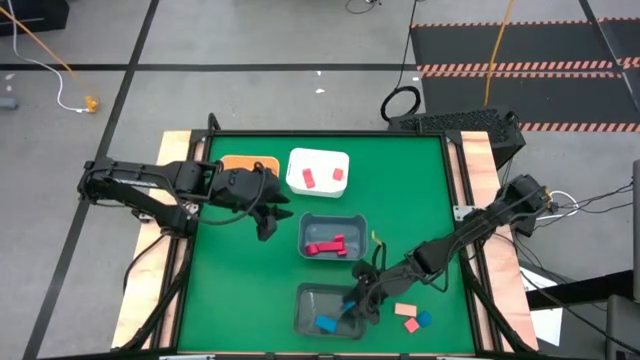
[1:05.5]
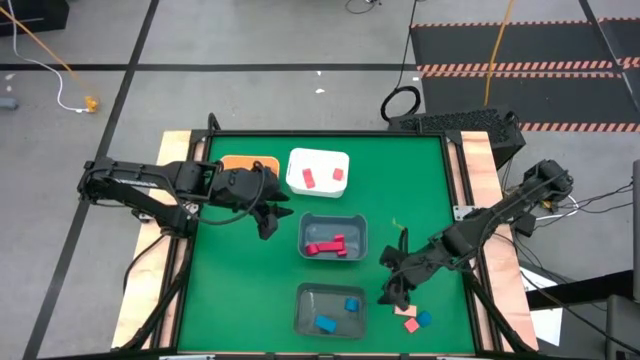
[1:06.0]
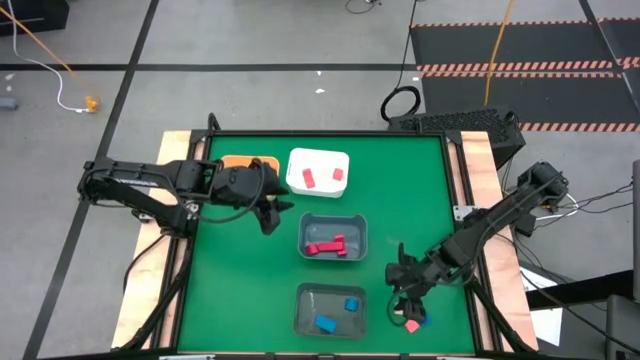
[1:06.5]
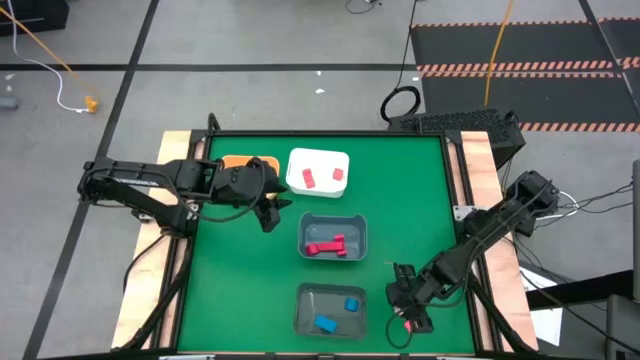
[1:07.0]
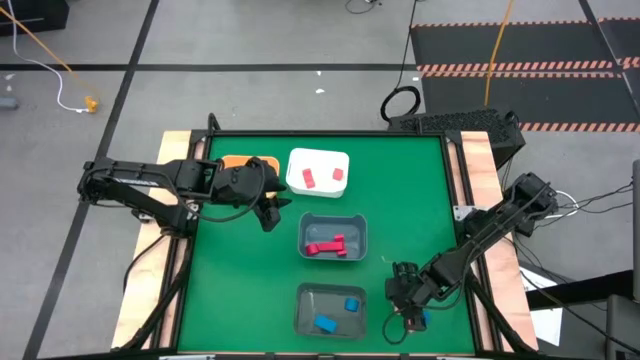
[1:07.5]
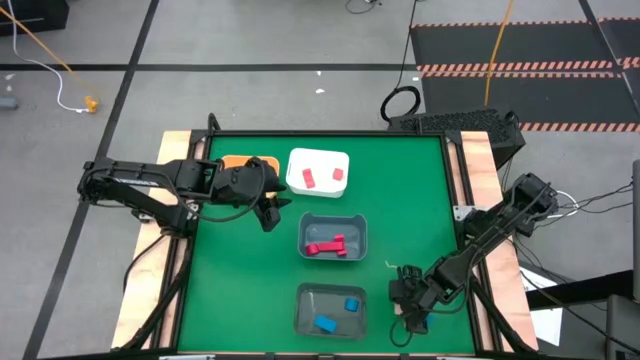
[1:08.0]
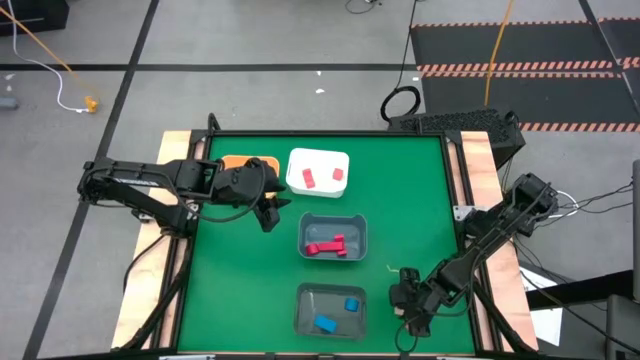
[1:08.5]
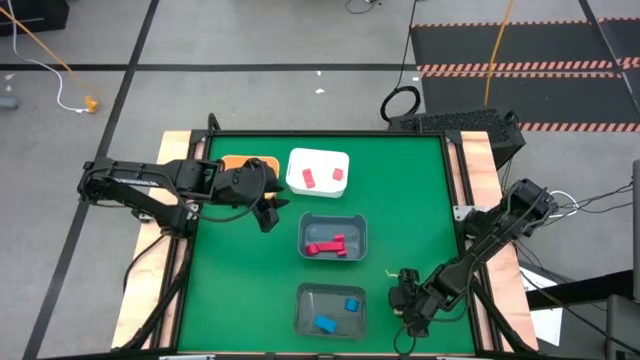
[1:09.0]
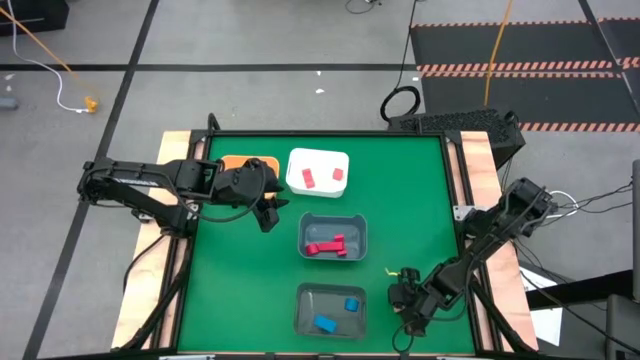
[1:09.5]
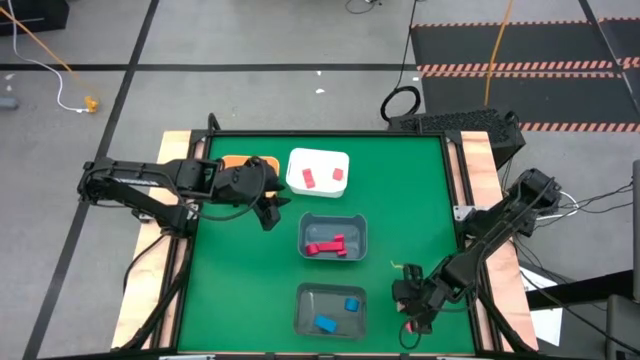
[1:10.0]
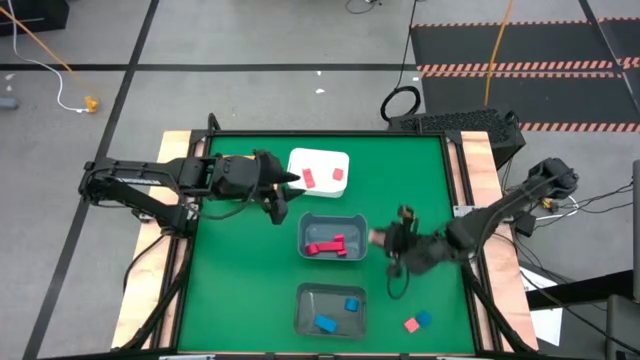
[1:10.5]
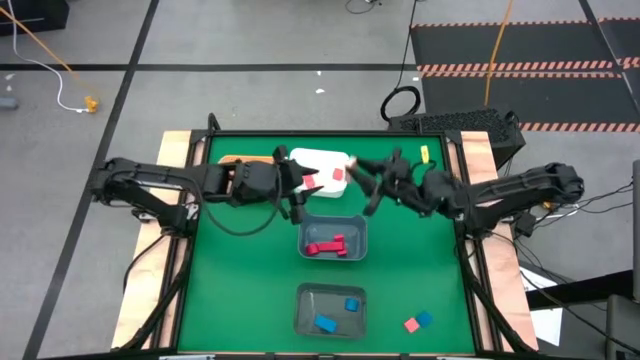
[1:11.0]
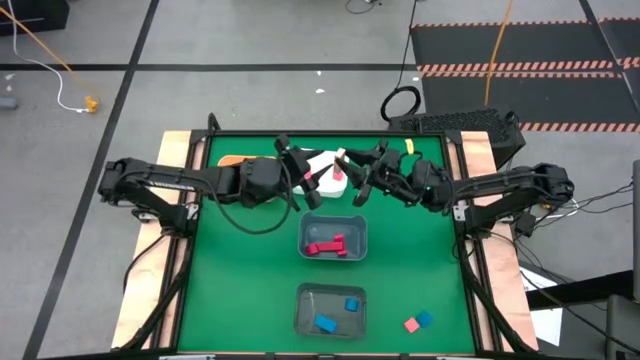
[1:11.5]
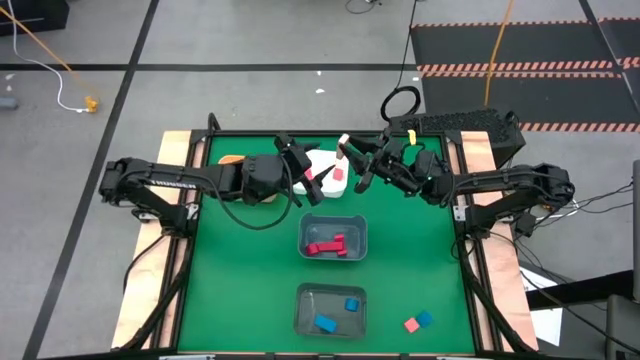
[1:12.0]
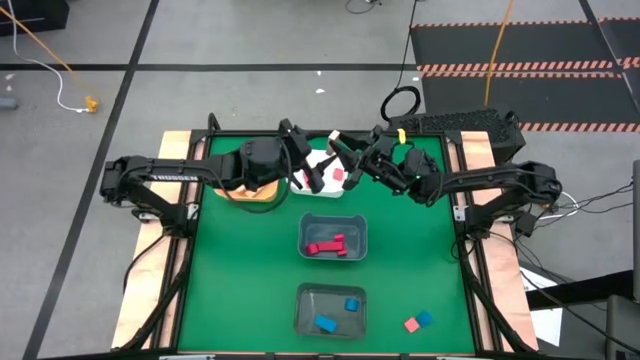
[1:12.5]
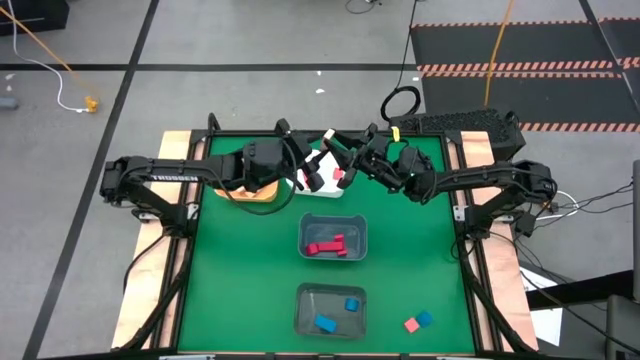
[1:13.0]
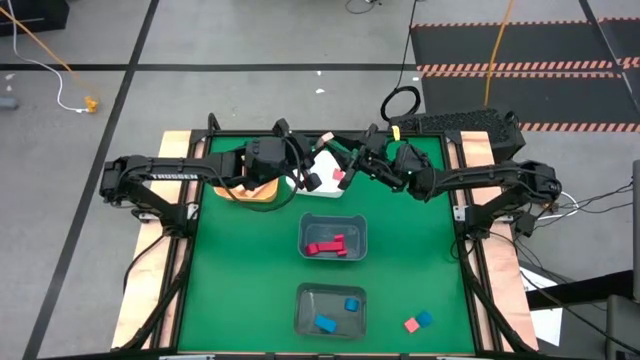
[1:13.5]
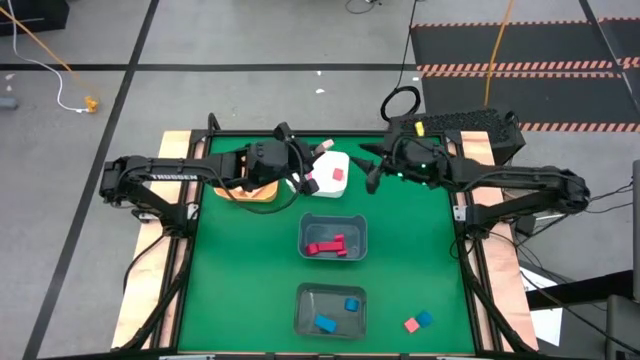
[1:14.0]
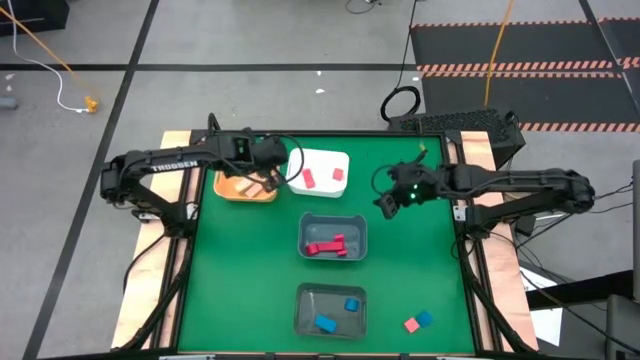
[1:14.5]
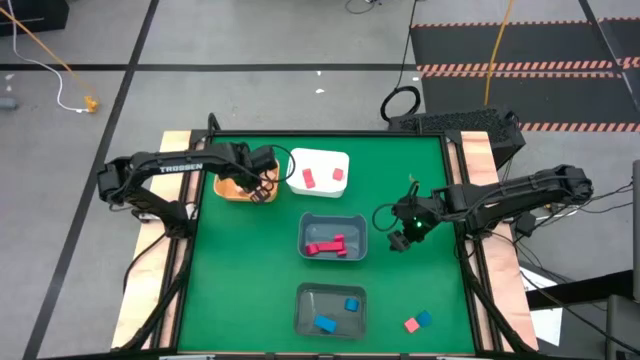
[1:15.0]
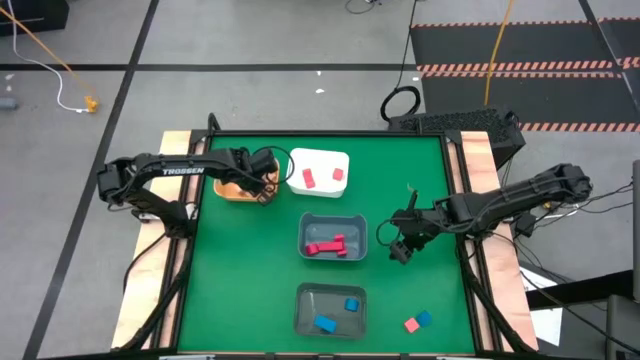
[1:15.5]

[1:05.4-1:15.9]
Task: Sort & place blocks by color
Put the brown wooden block into the yellow bin

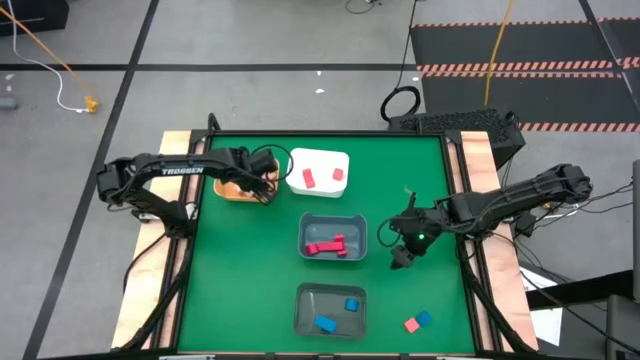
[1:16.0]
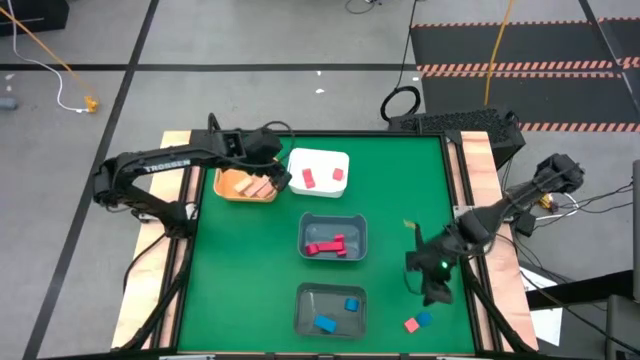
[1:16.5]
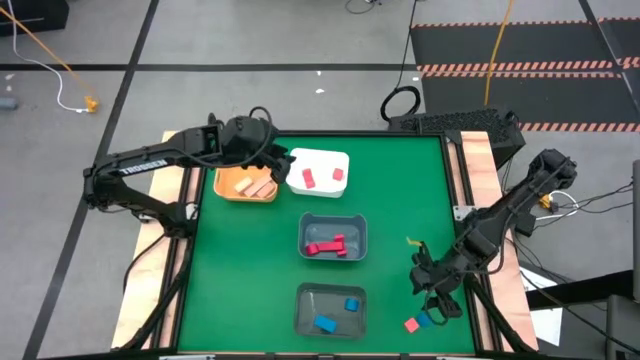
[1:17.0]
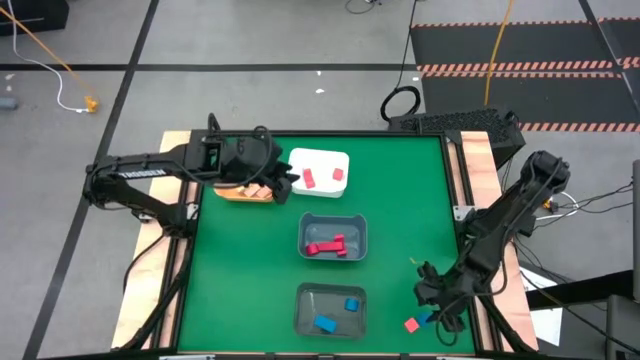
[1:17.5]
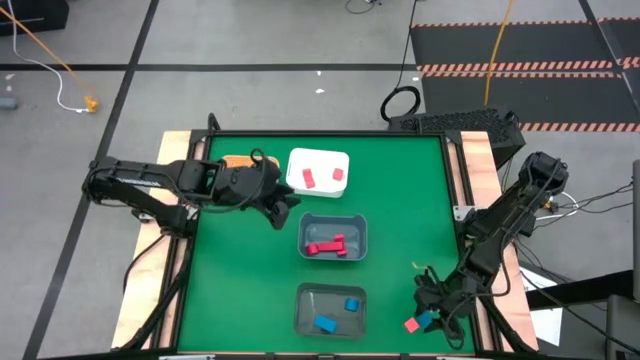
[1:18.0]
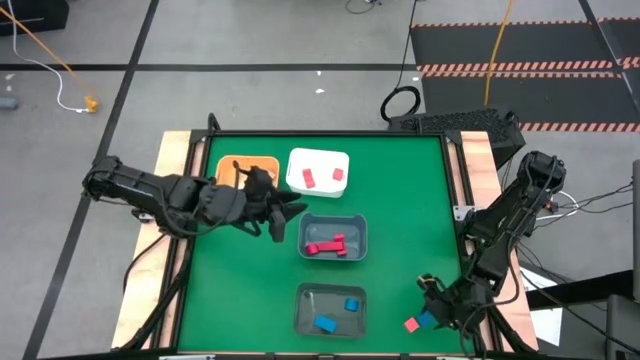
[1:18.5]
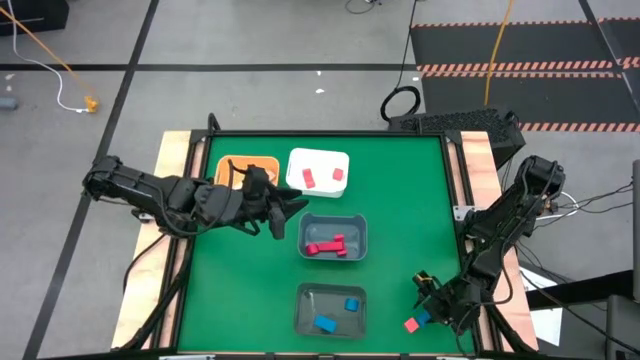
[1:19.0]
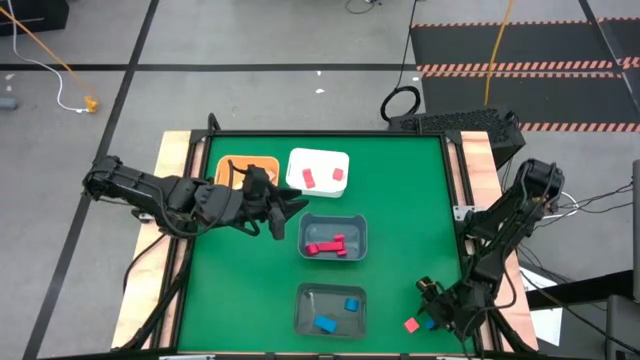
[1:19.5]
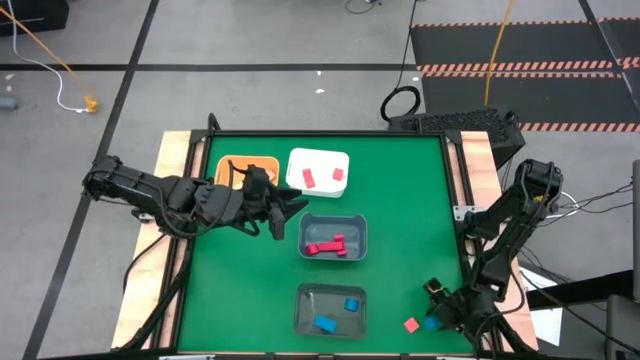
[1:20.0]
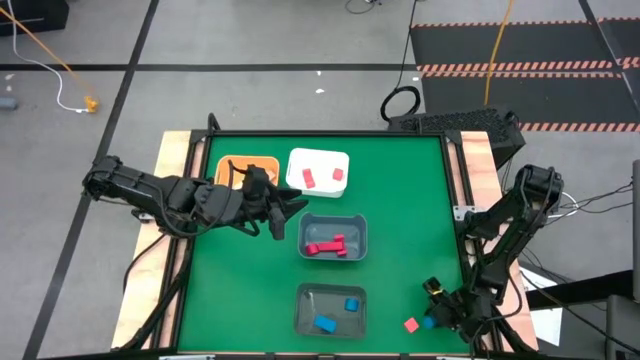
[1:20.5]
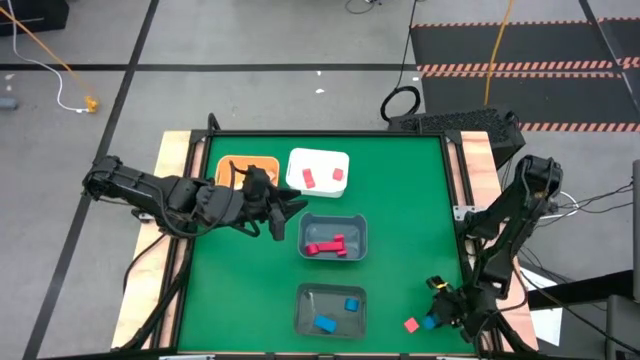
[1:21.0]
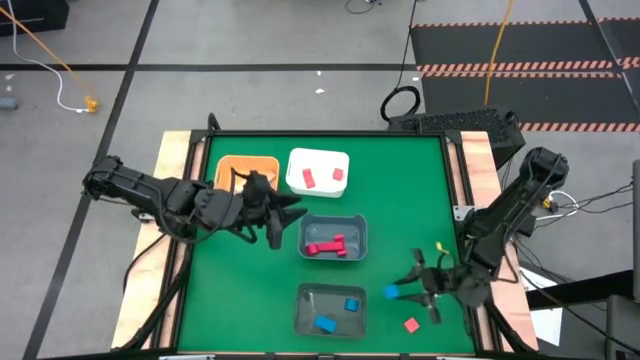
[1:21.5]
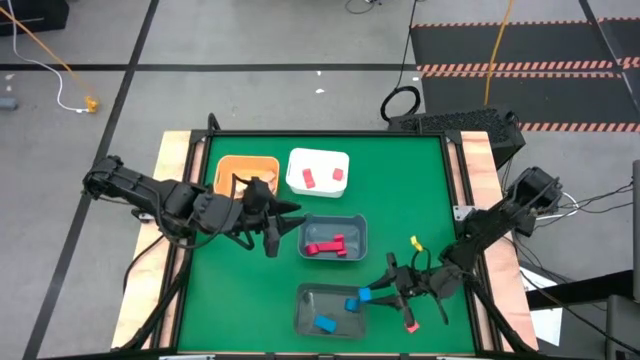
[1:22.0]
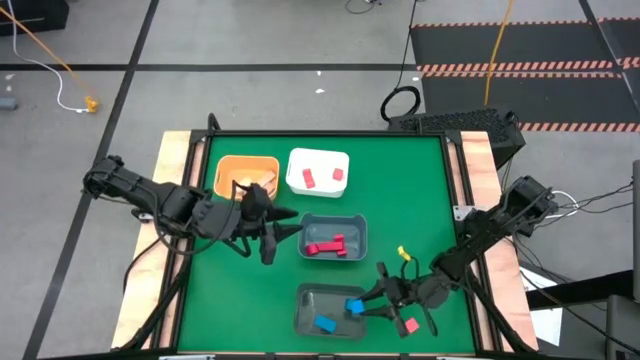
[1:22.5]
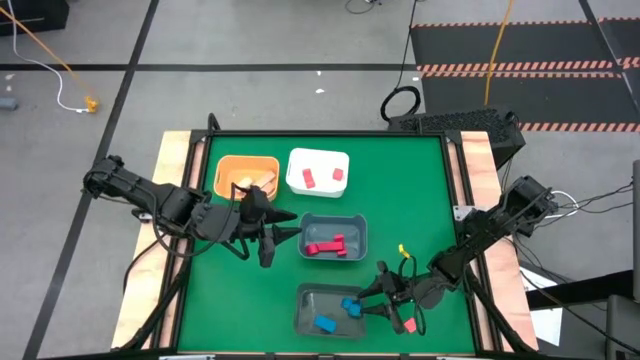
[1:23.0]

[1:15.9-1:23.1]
Put the blue wooden block into the black bin

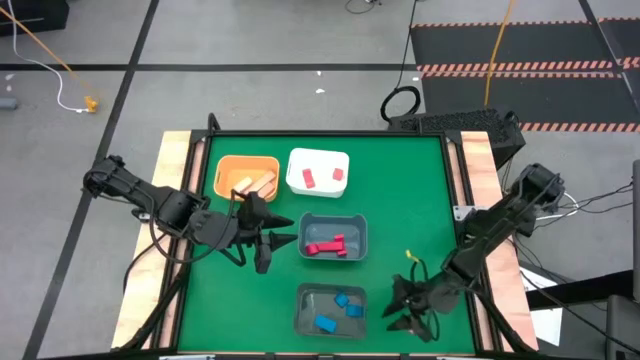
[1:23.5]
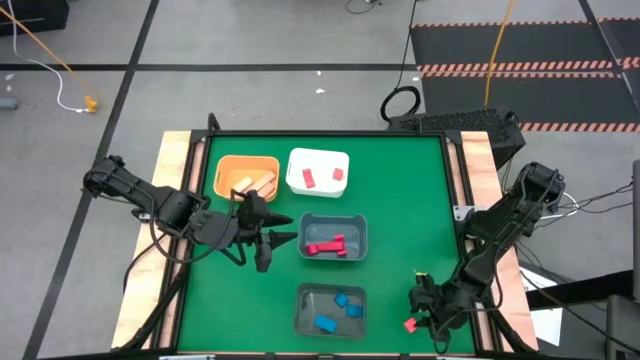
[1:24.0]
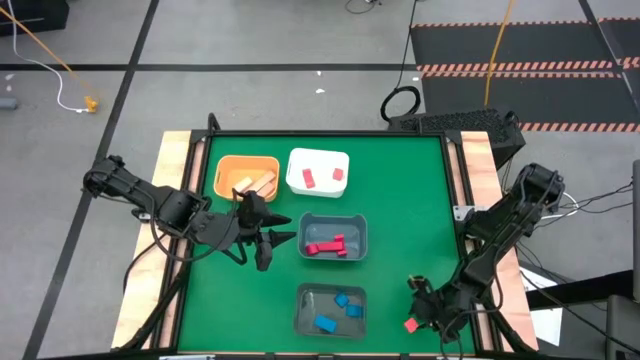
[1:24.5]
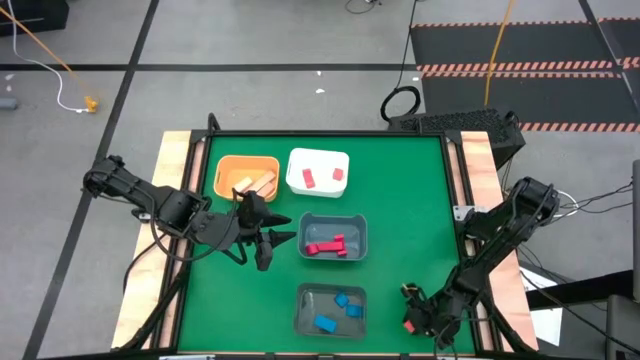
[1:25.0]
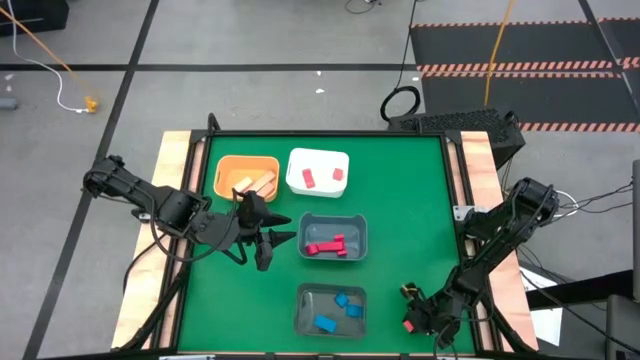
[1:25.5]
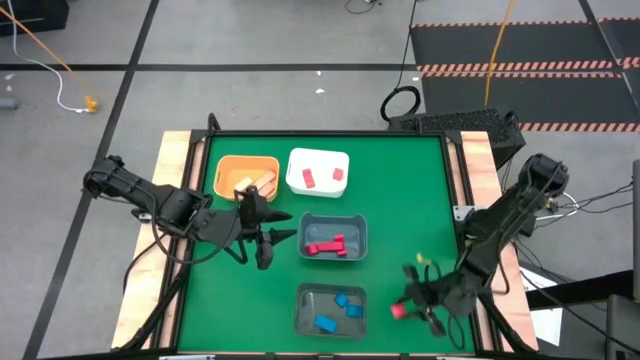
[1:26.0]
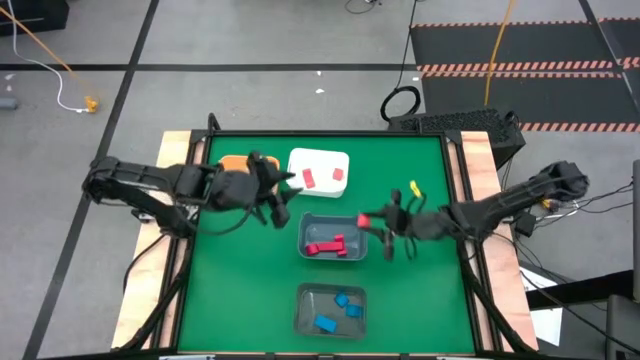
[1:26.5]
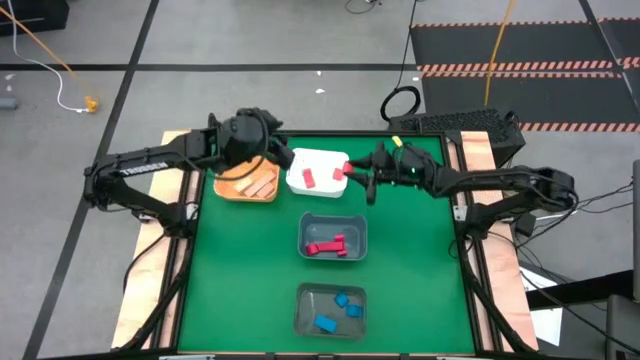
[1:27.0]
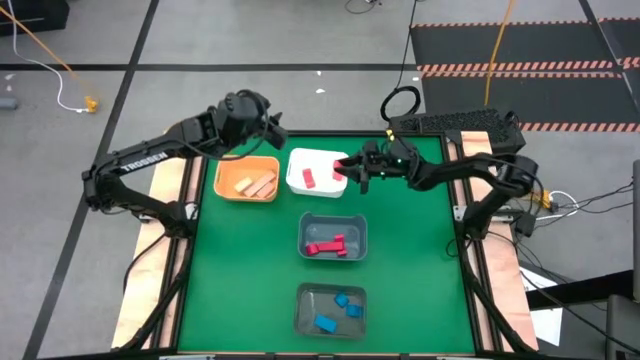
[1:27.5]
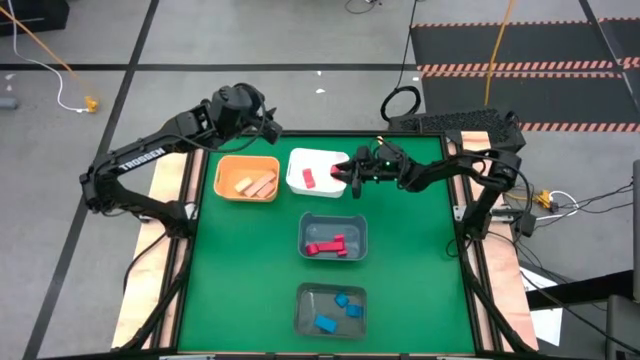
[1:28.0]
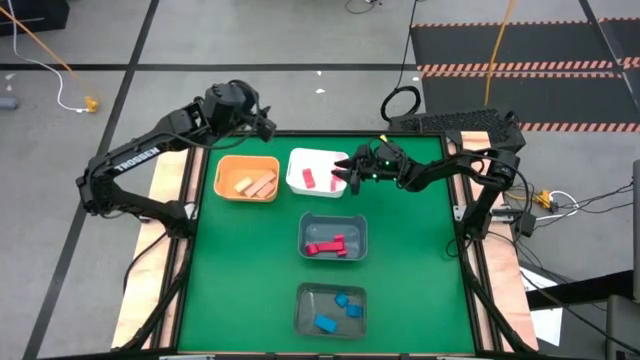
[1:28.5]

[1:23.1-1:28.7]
Put the orange wooden block into the white bin
